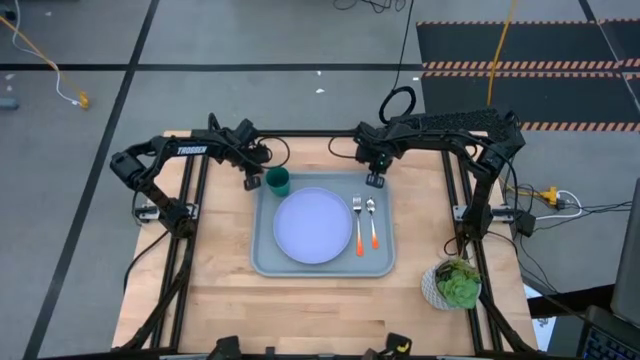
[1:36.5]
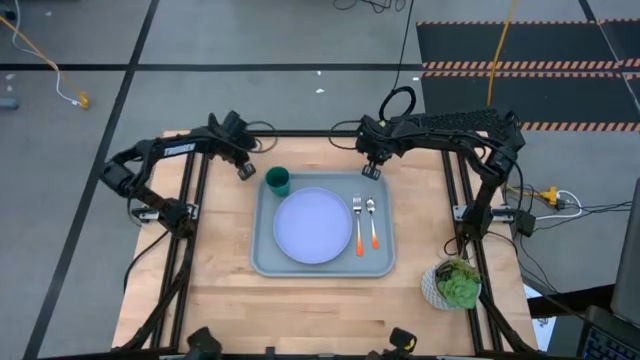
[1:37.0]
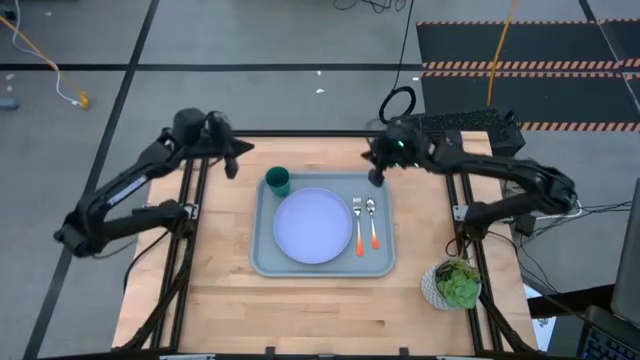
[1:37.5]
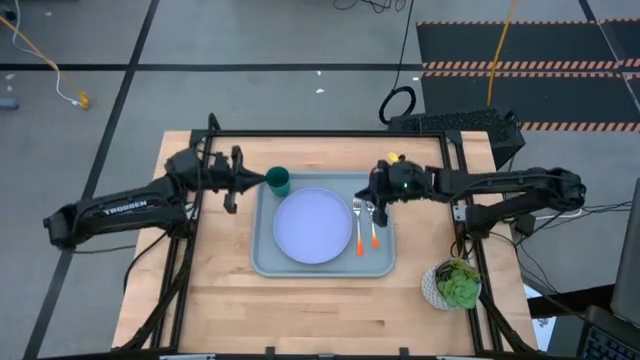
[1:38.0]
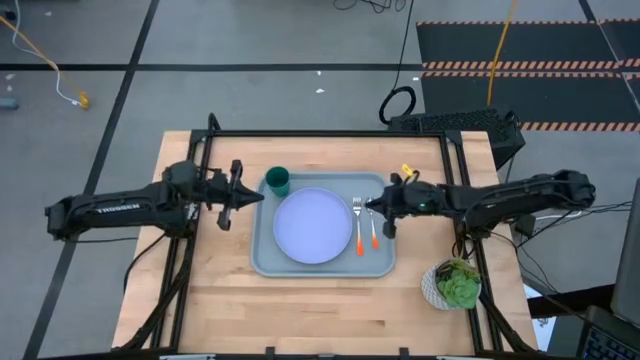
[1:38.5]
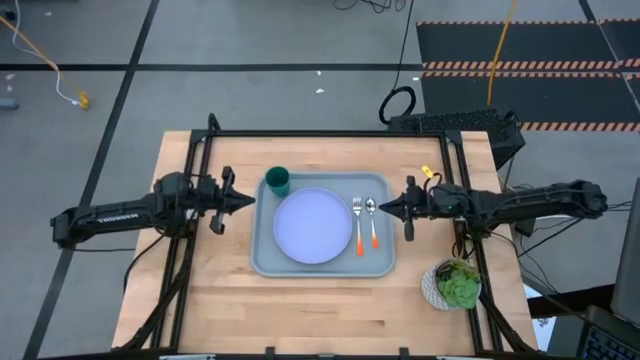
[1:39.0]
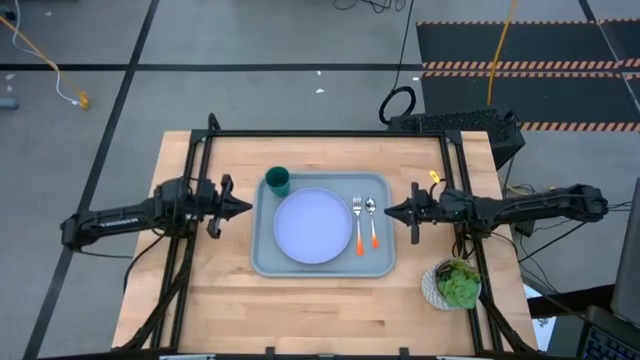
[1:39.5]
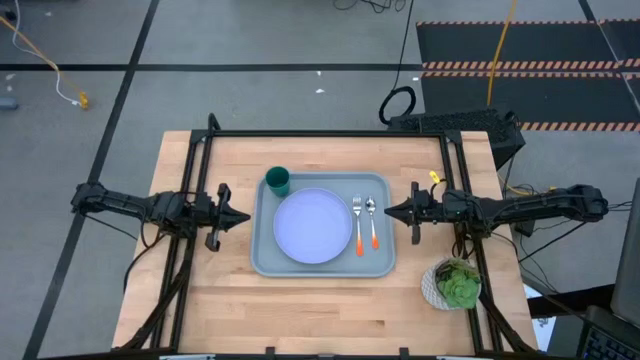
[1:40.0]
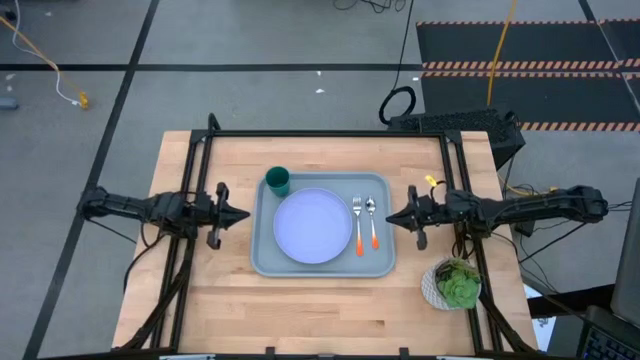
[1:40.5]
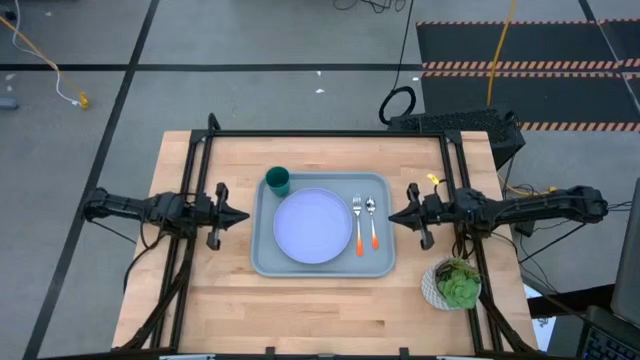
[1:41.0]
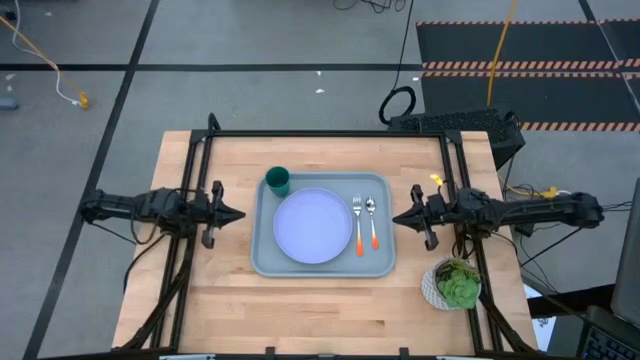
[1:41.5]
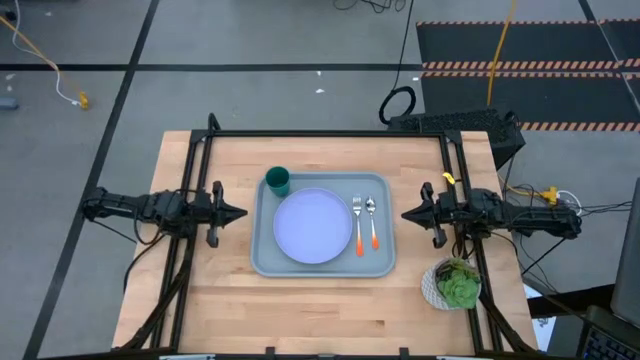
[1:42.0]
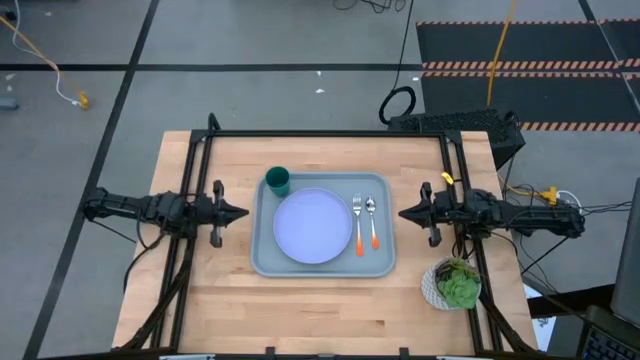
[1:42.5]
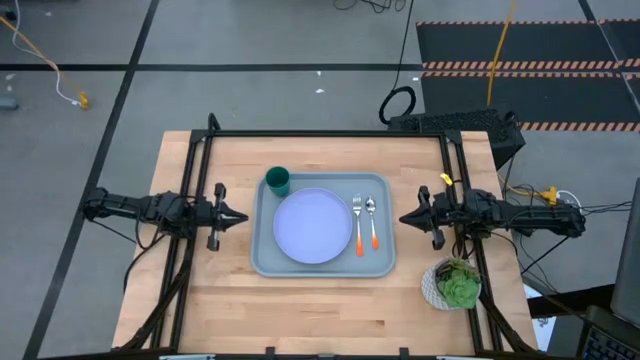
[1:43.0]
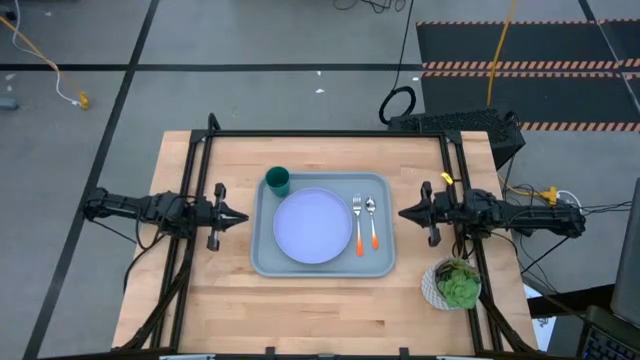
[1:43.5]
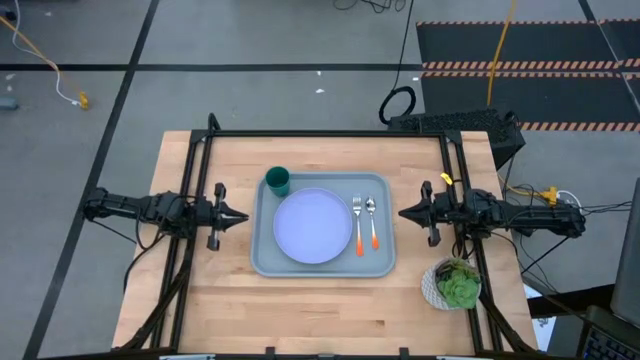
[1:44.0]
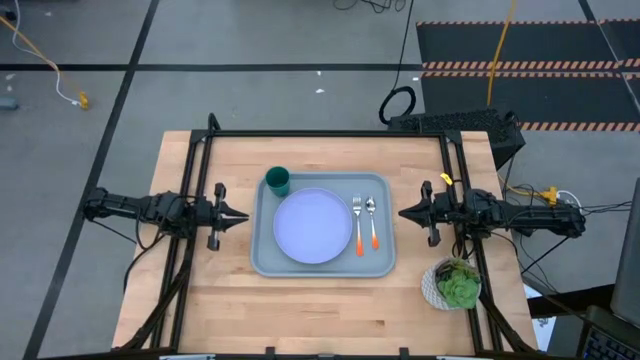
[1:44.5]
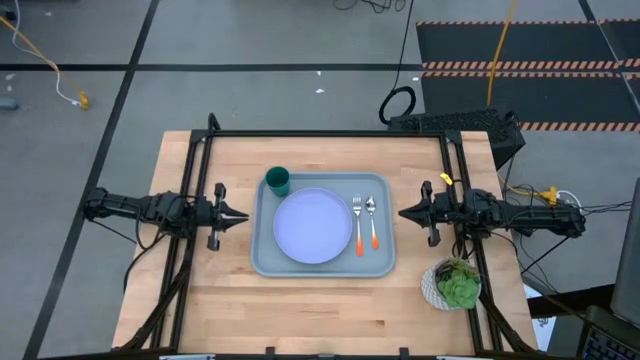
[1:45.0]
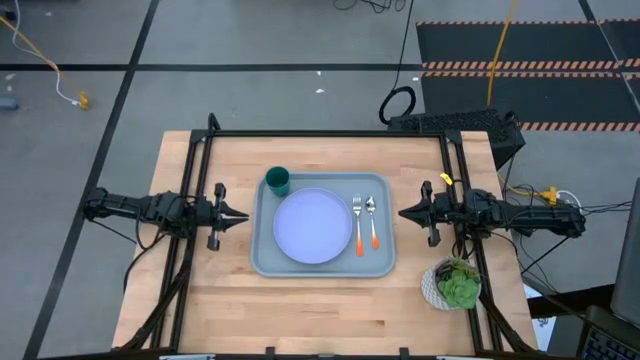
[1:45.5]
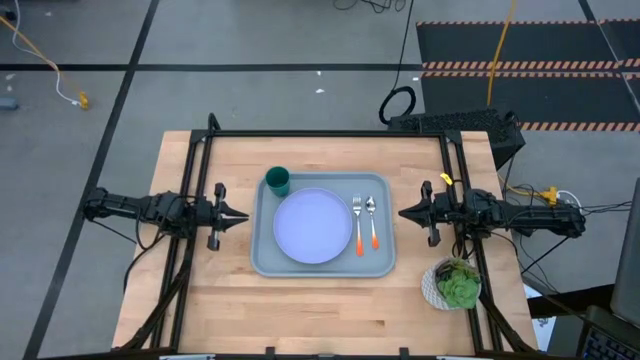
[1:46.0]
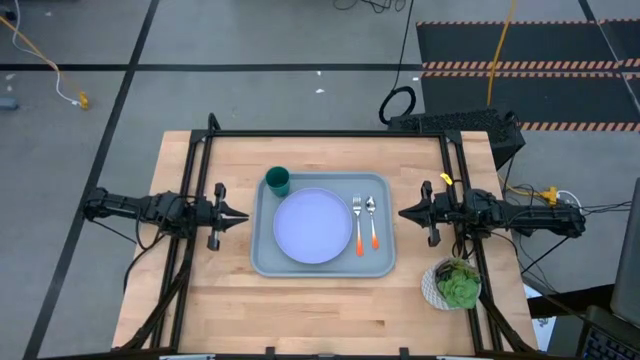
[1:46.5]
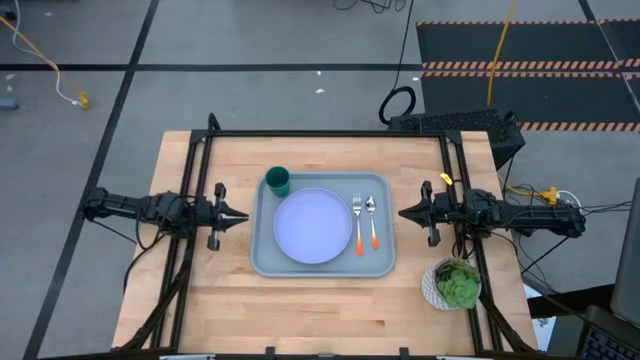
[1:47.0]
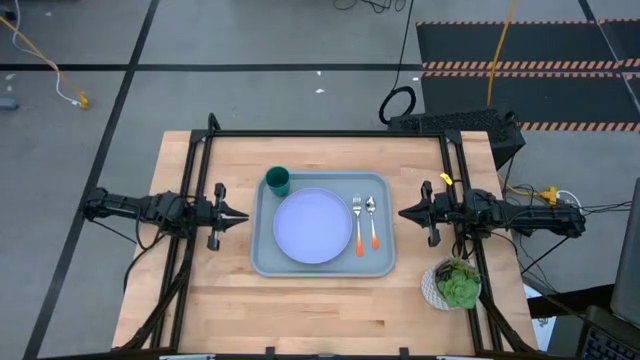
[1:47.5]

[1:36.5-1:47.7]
Task: Pick and place plate/cup/fork/spoon on tray
Return to Home Position

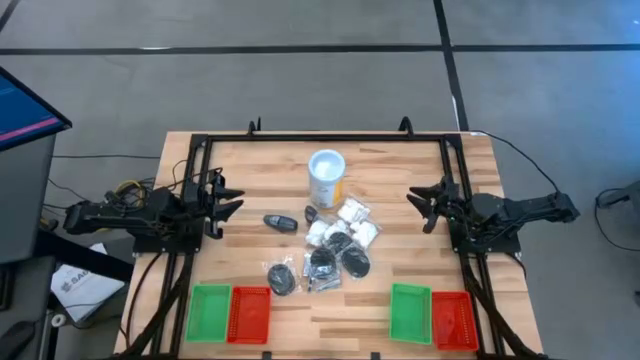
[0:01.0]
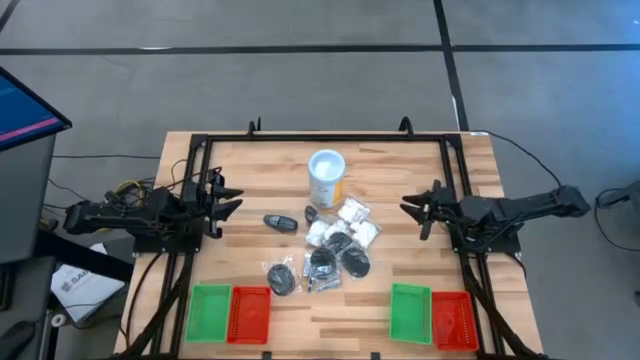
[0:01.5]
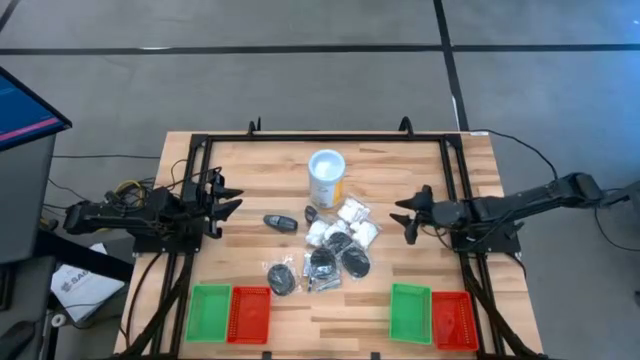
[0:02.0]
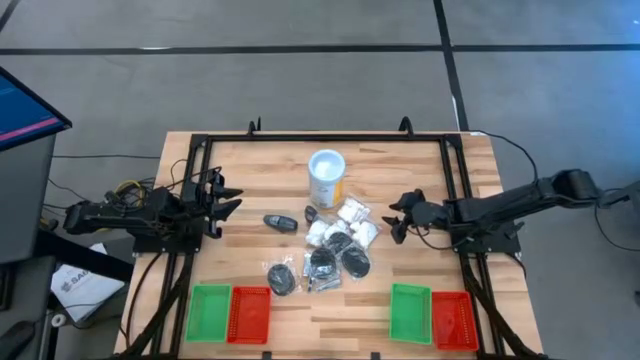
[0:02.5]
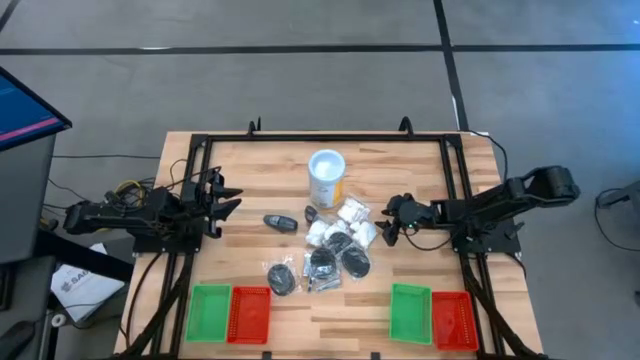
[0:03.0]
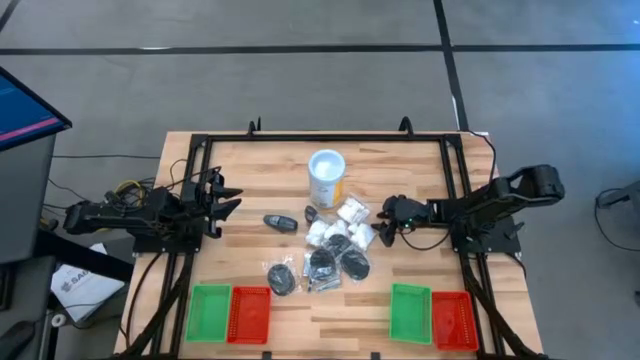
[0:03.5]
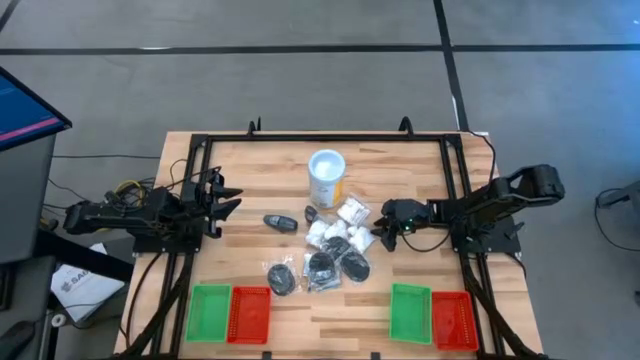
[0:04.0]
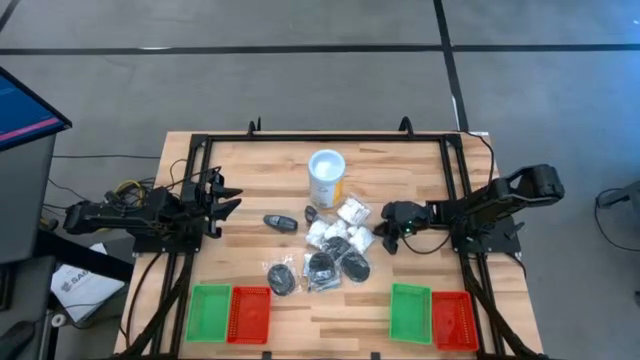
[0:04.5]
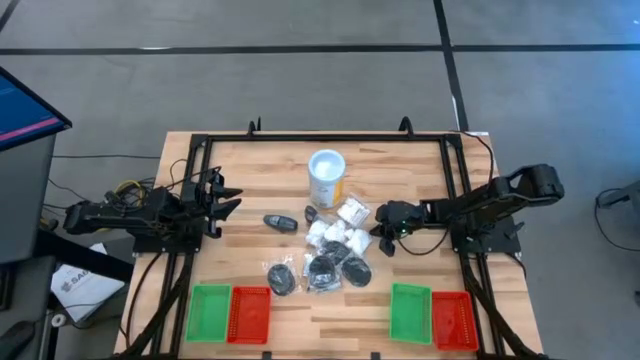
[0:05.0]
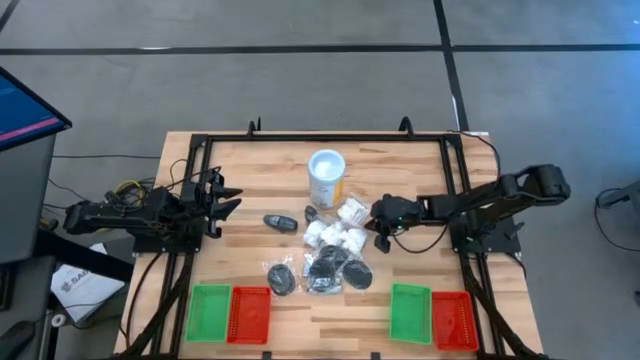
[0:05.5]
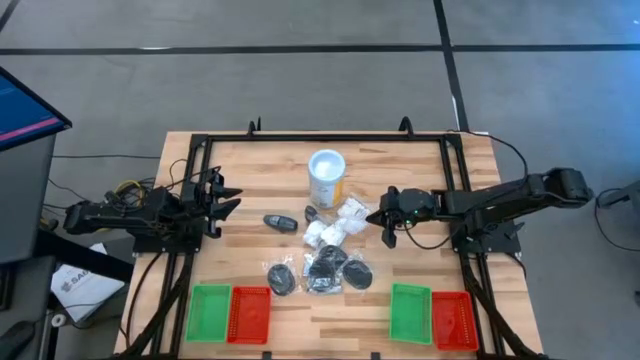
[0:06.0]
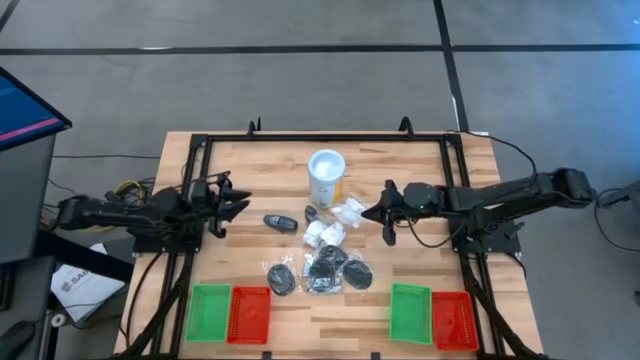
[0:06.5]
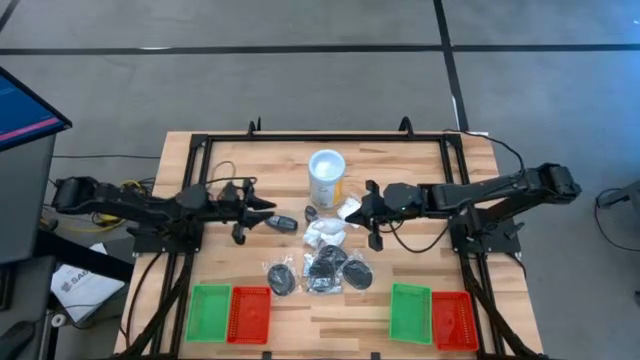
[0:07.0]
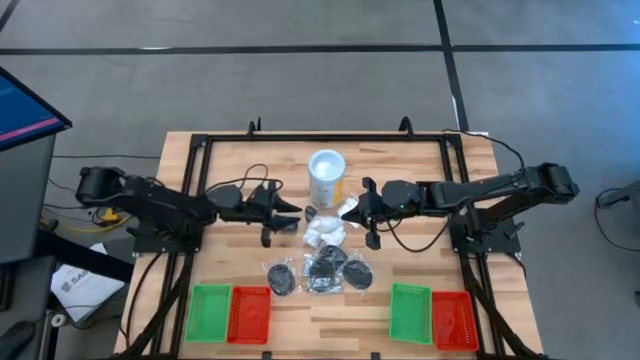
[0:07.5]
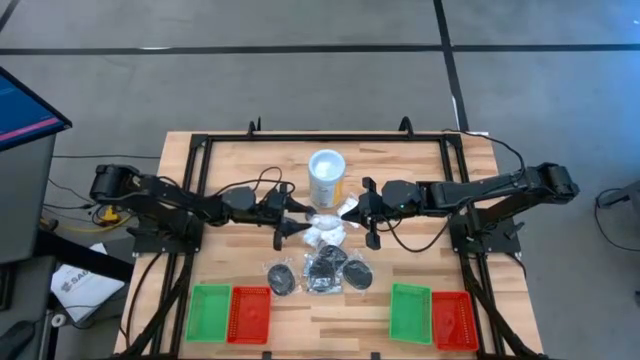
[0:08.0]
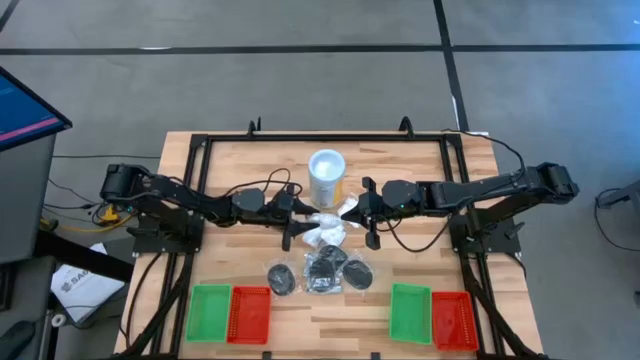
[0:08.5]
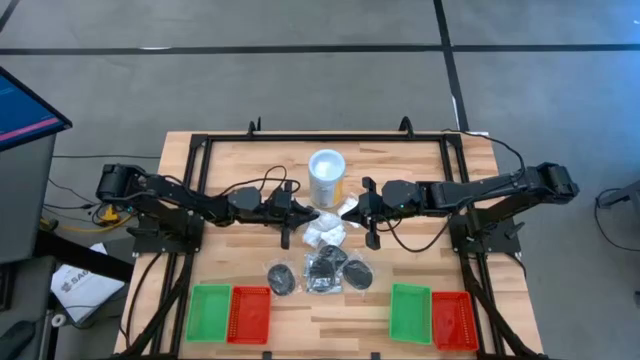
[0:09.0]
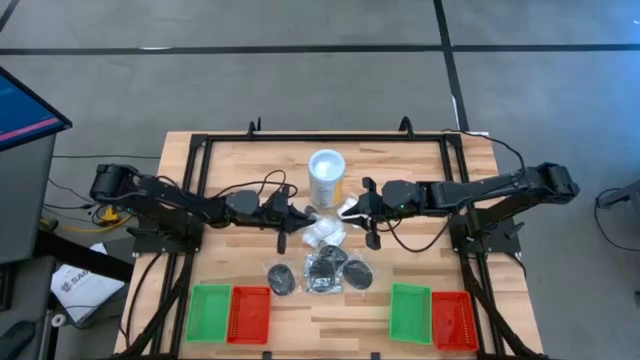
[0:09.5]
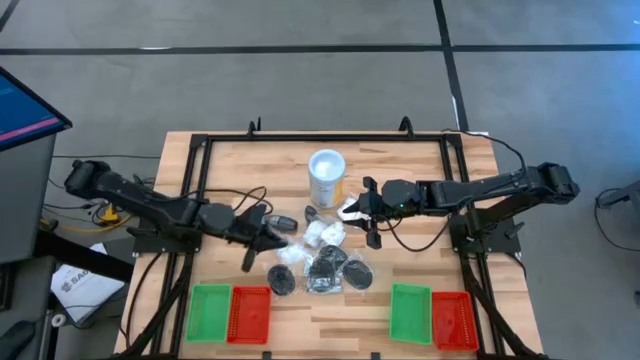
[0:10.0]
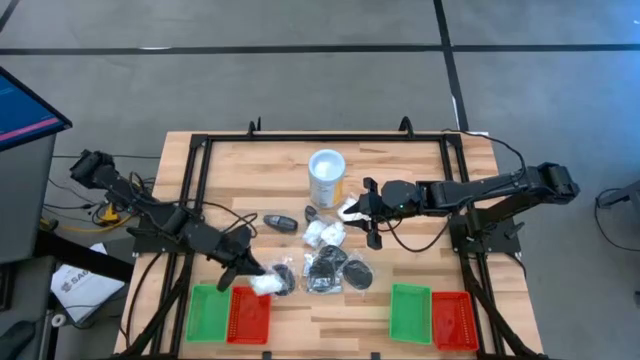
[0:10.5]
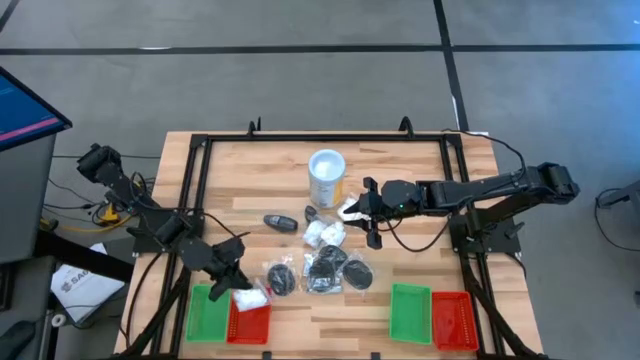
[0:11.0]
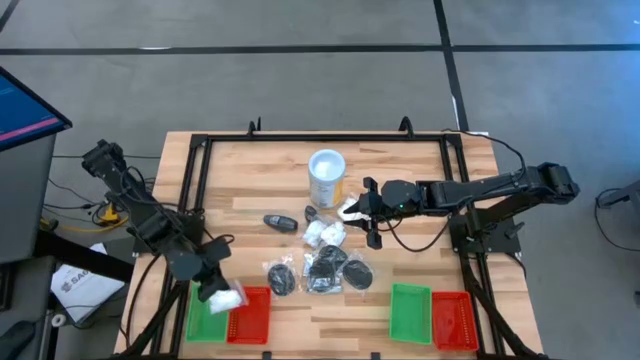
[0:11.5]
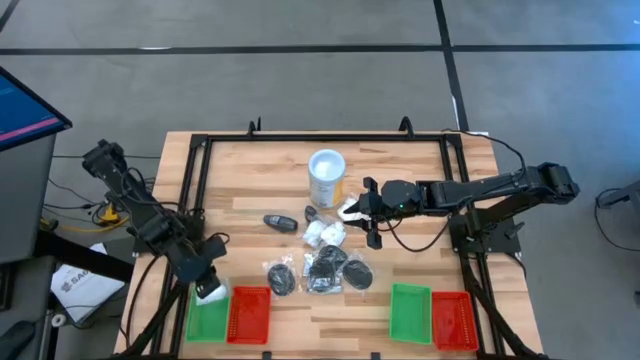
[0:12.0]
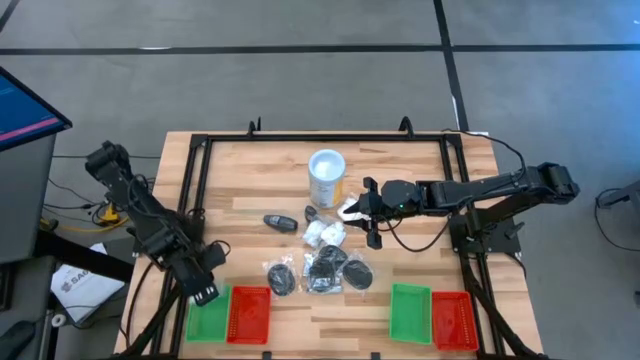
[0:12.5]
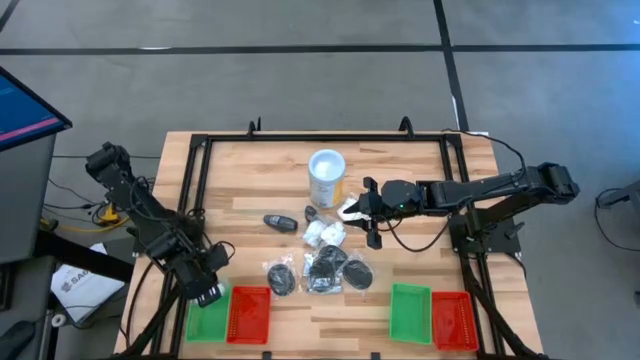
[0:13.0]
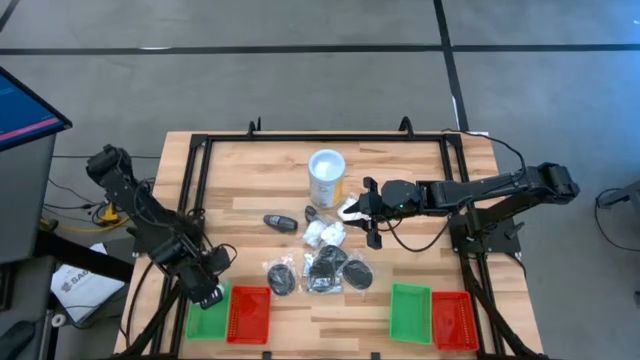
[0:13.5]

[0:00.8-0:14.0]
Task: Pick & Place Travel size toiletries
Put the cotton pack into the left green bin
